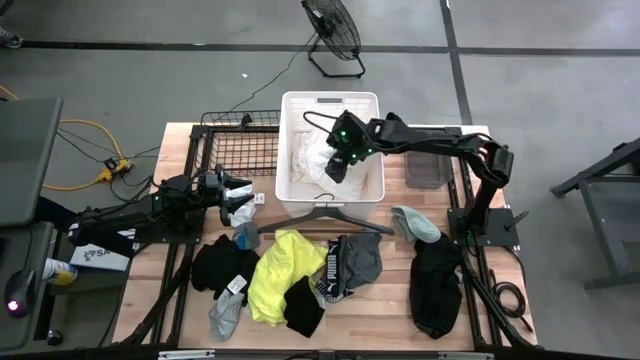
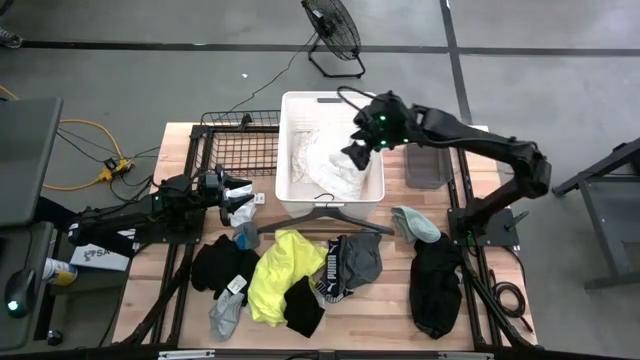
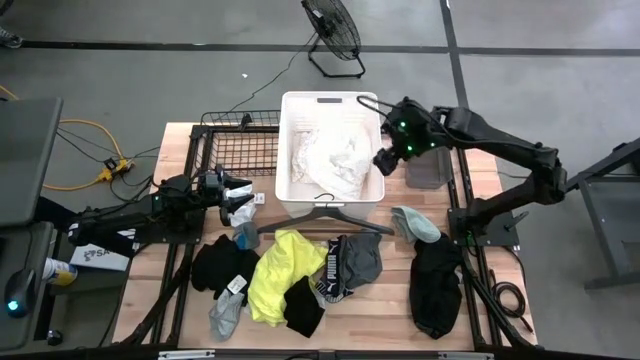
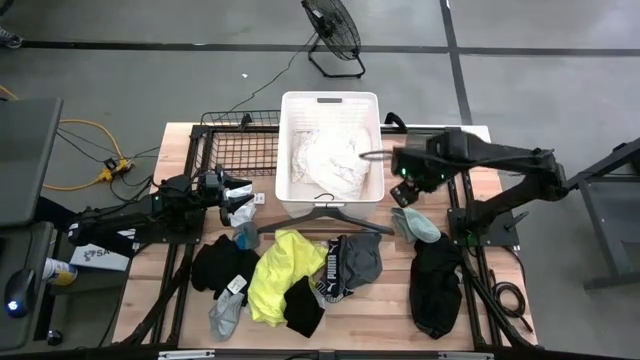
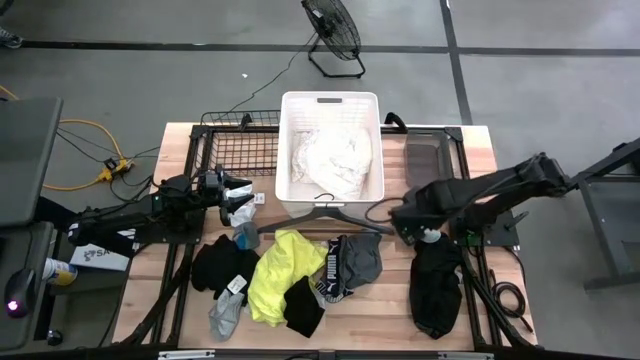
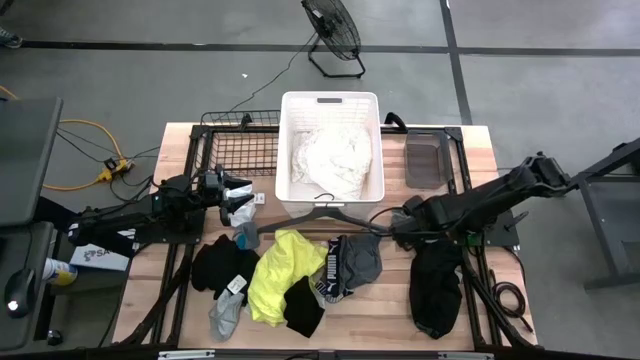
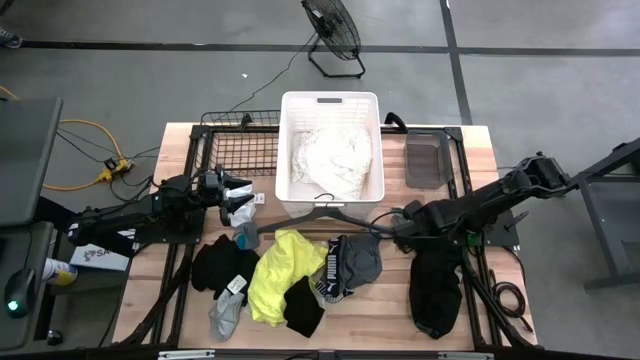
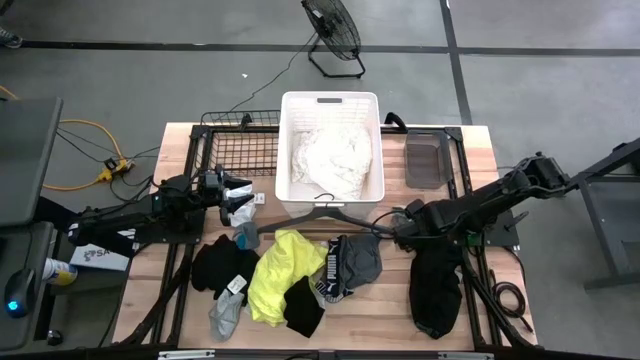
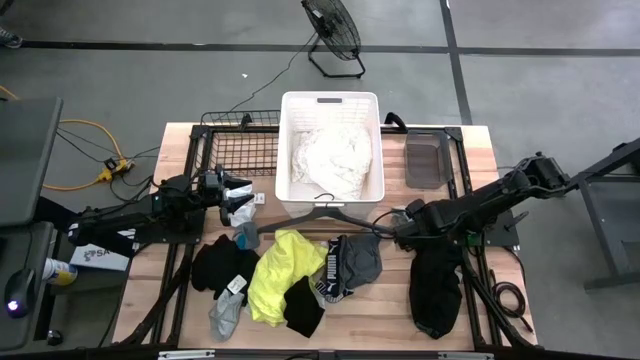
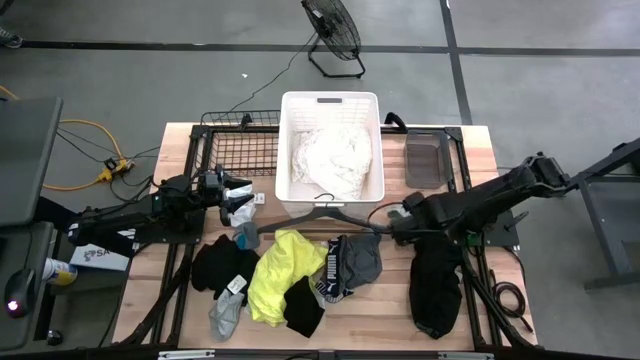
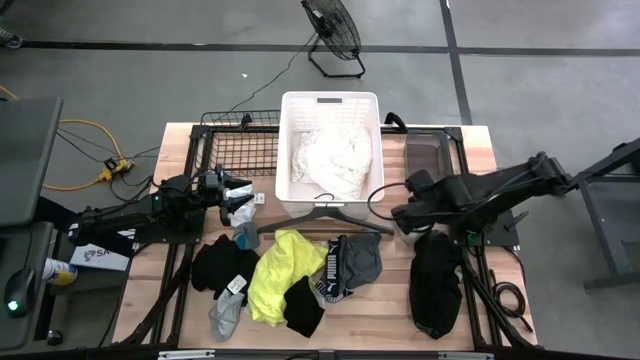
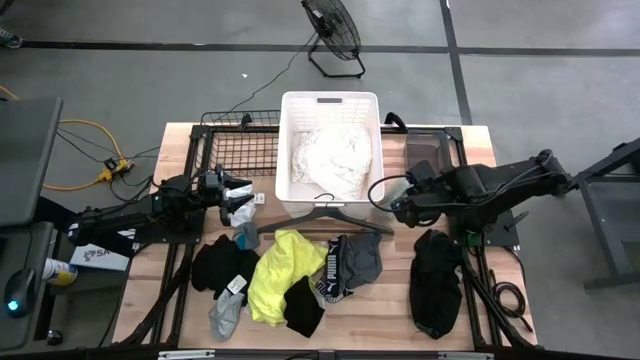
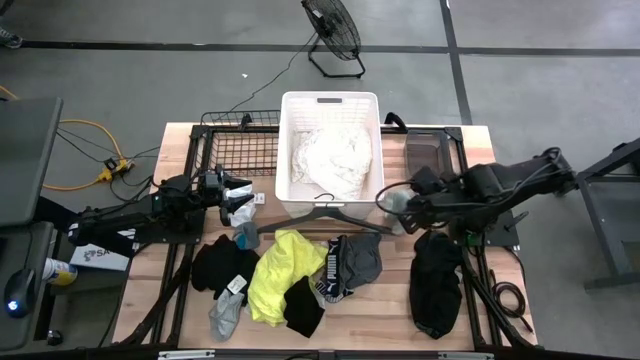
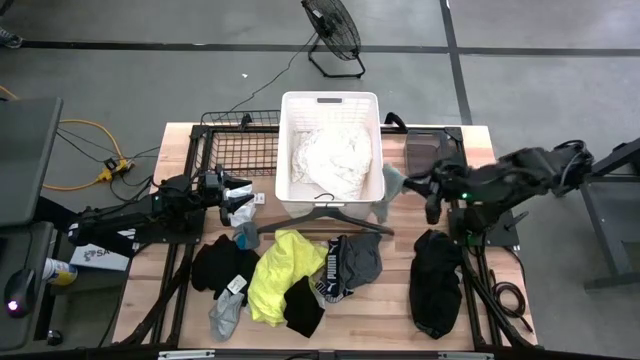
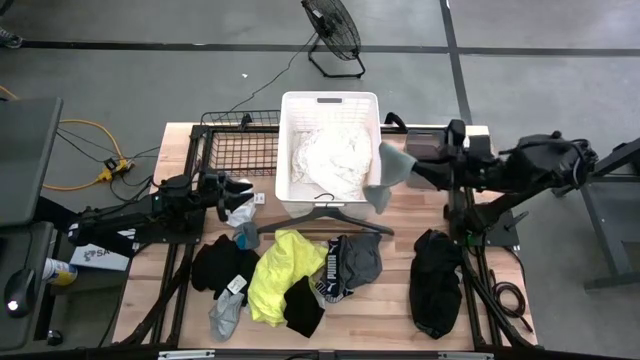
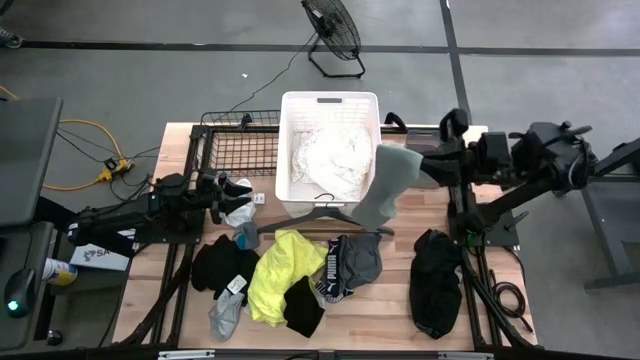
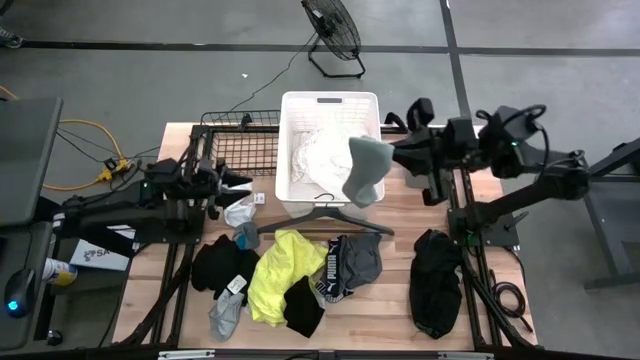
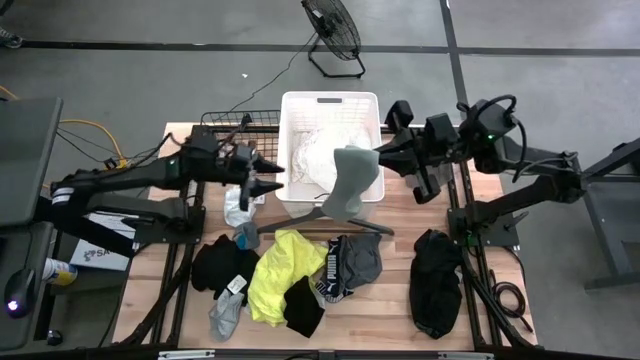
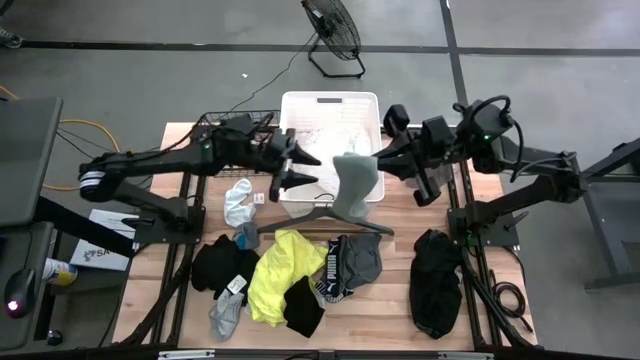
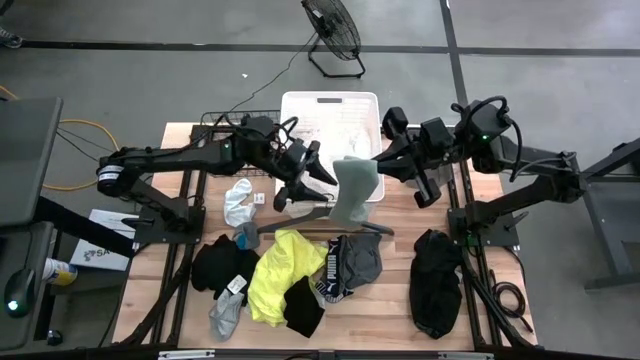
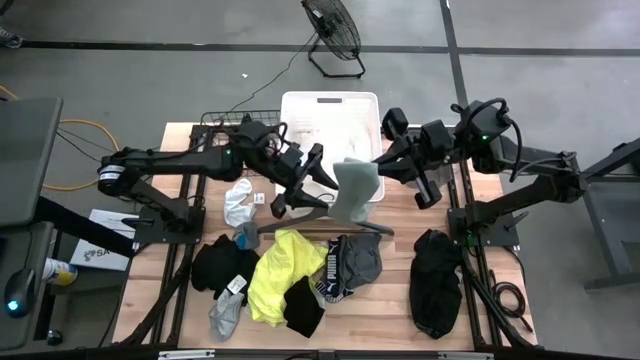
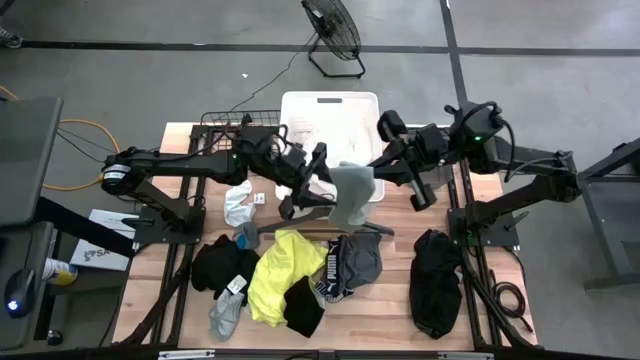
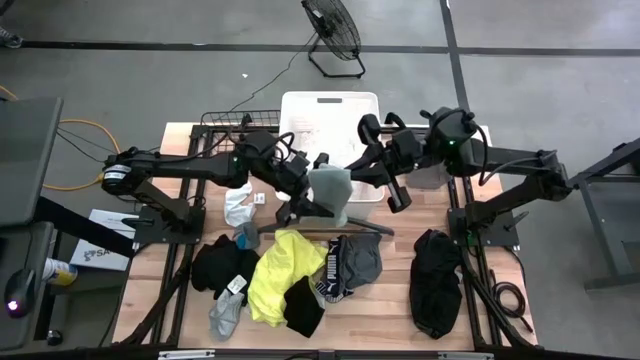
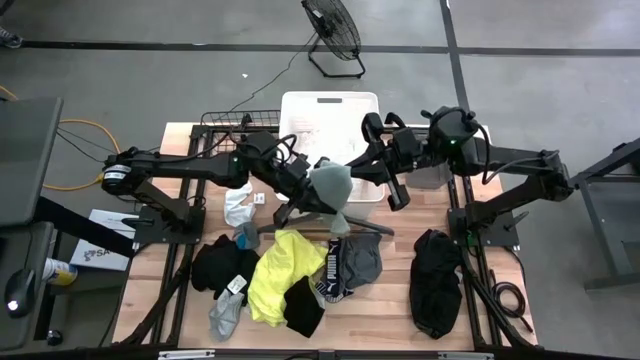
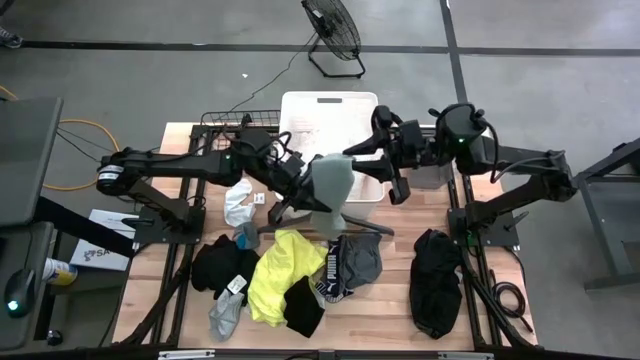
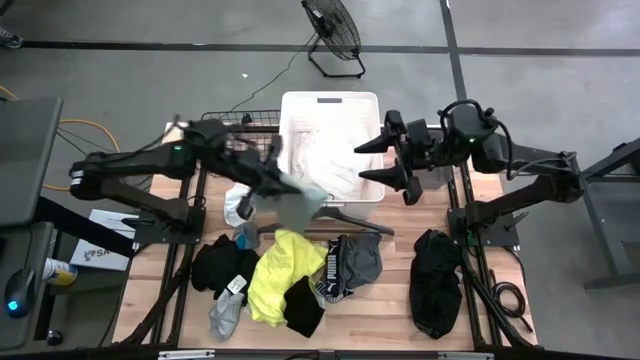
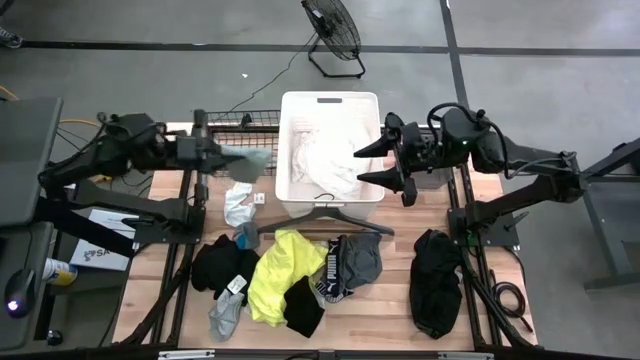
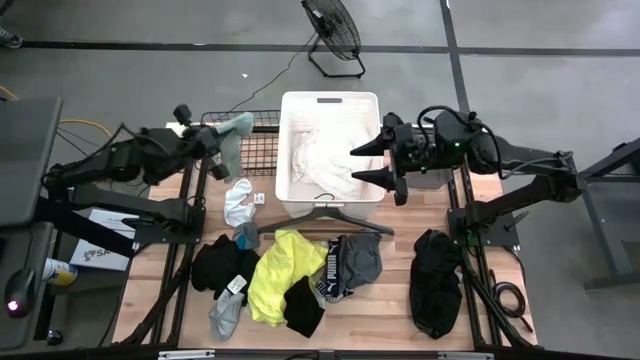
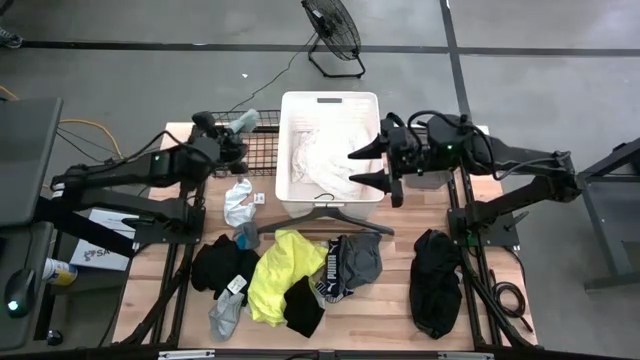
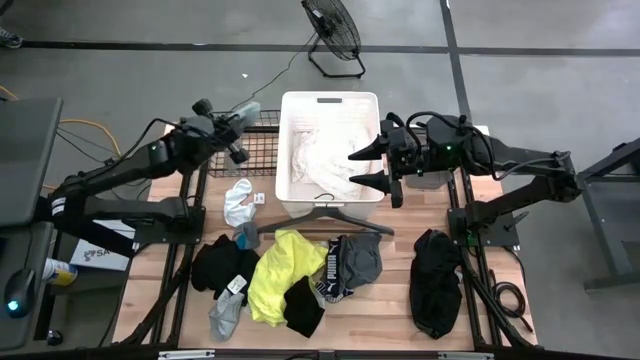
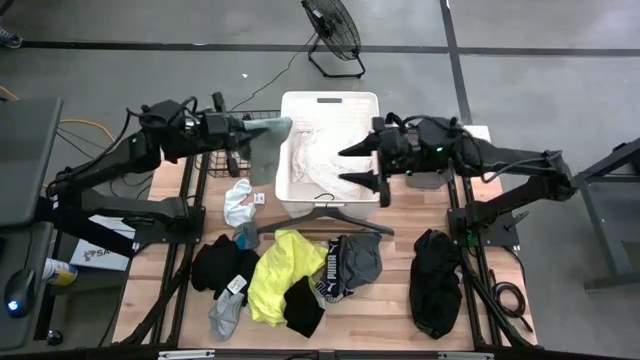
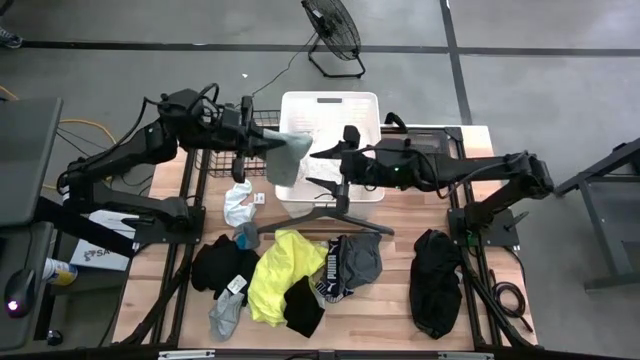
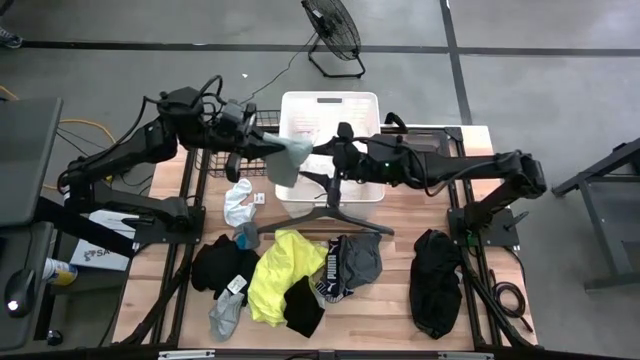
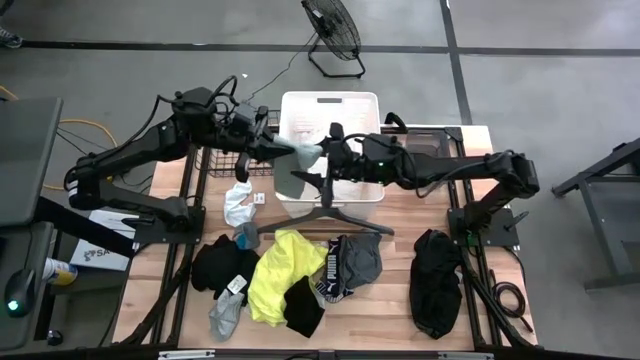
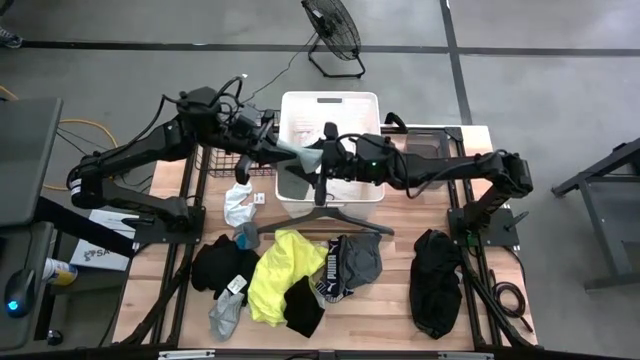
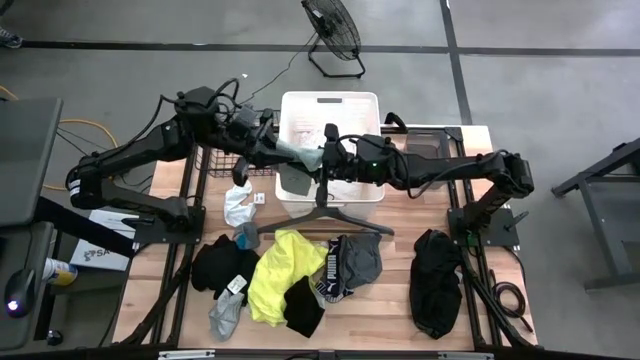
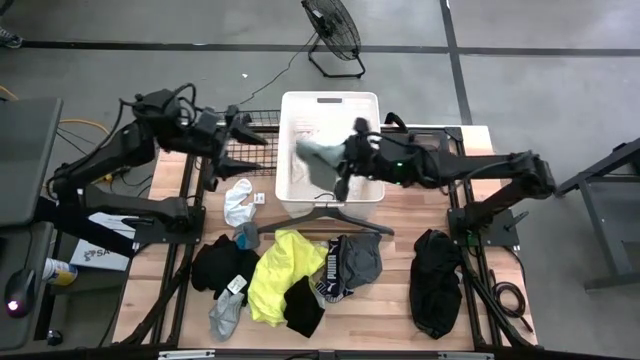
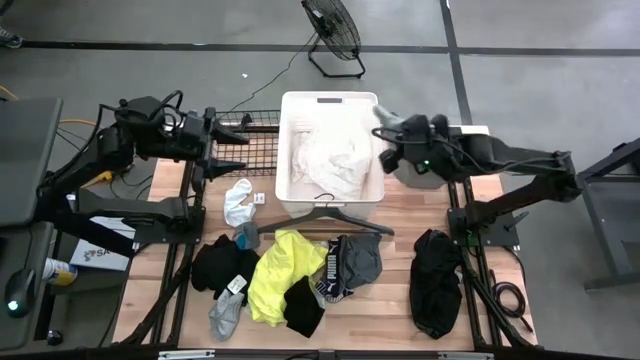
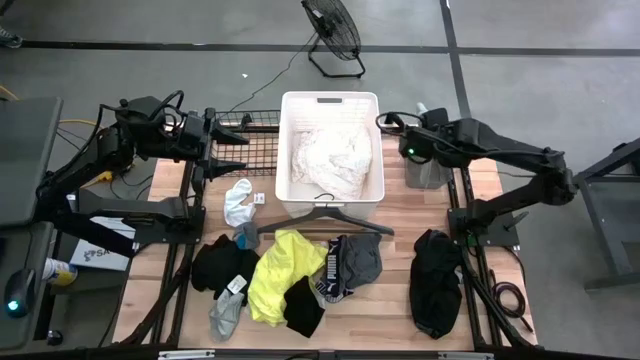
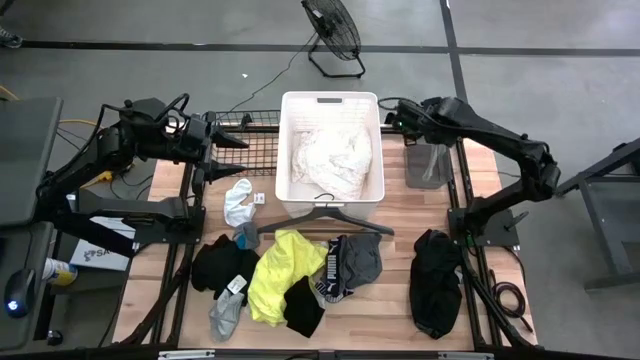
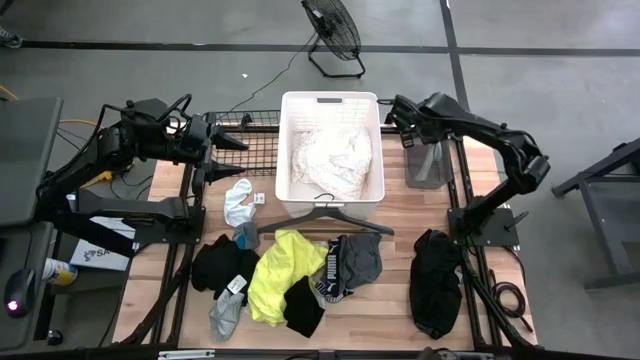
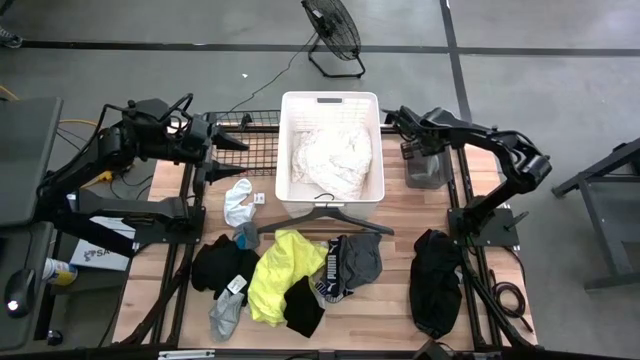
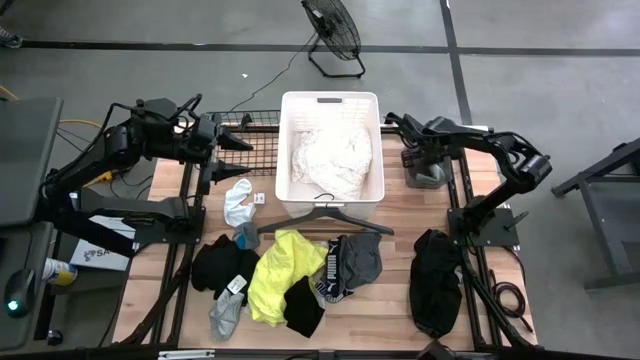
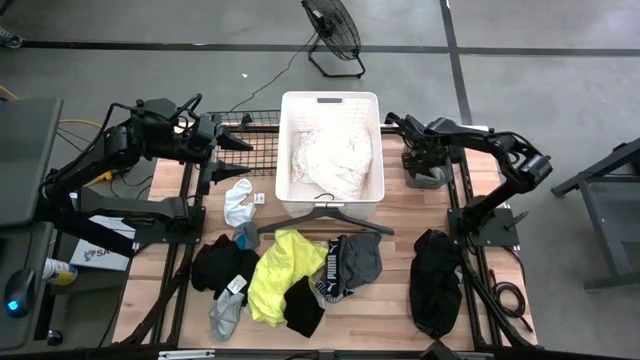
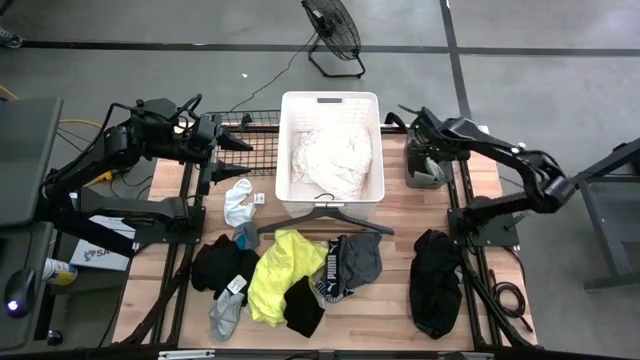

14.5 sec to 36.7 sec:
Task: Pick & Place Cloths
Put the right grey sock into the black bin
